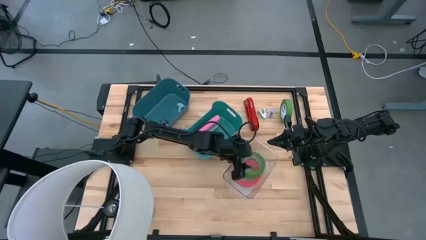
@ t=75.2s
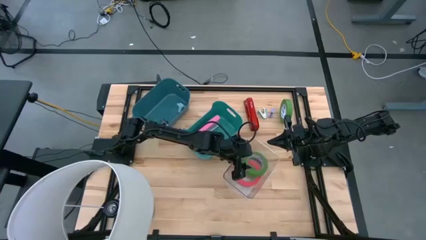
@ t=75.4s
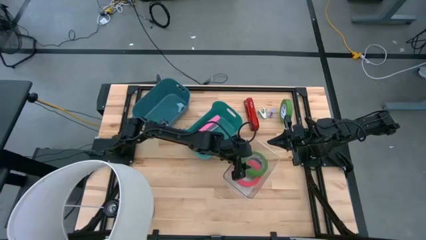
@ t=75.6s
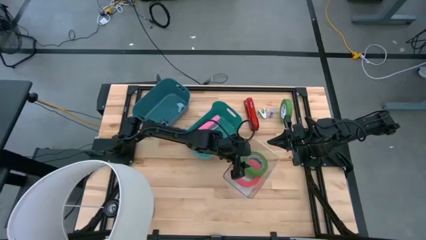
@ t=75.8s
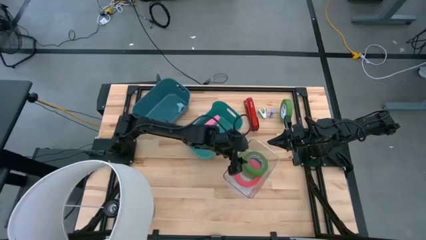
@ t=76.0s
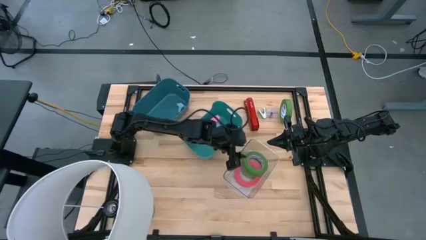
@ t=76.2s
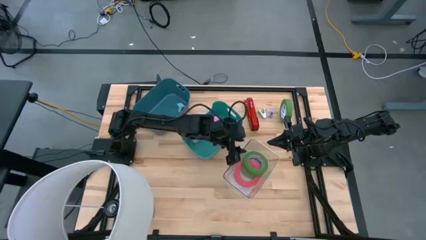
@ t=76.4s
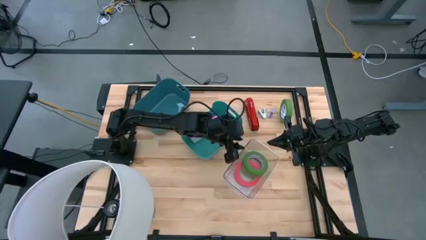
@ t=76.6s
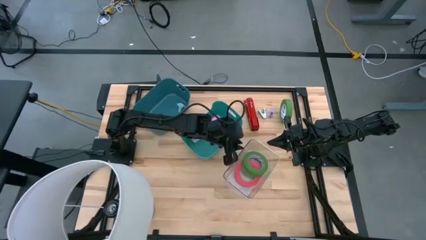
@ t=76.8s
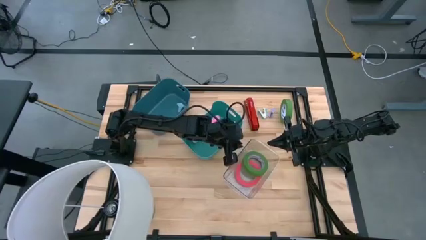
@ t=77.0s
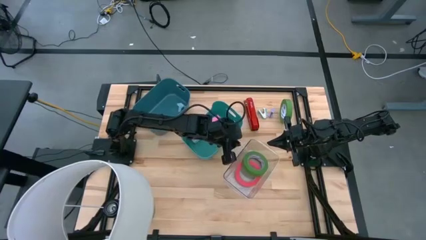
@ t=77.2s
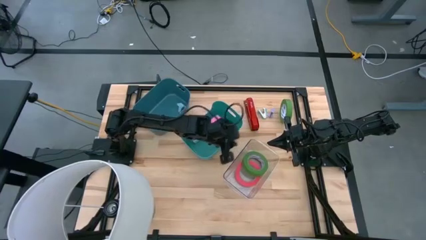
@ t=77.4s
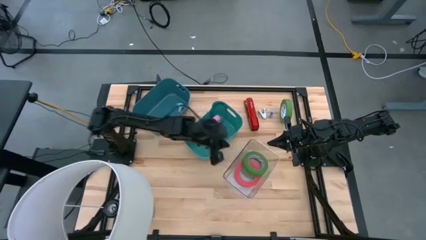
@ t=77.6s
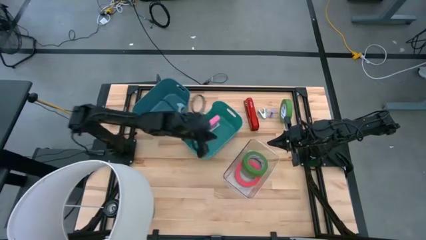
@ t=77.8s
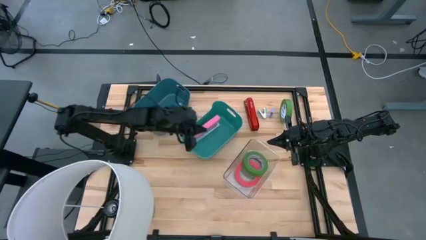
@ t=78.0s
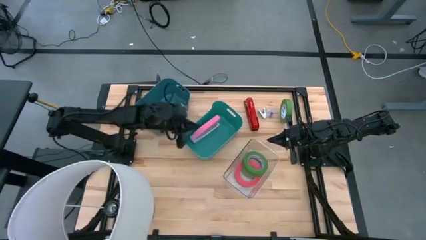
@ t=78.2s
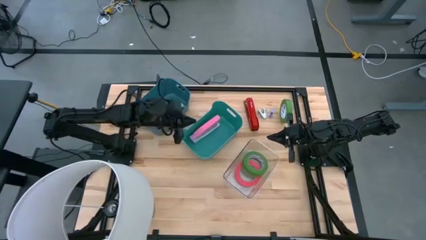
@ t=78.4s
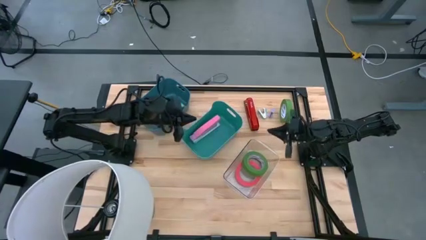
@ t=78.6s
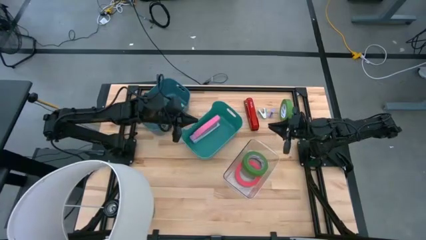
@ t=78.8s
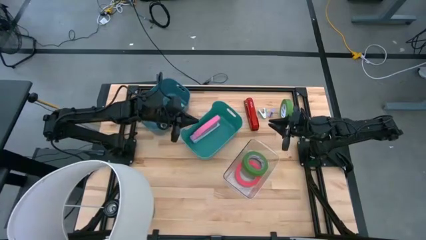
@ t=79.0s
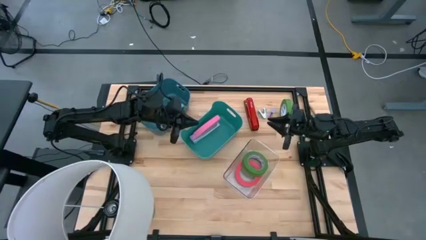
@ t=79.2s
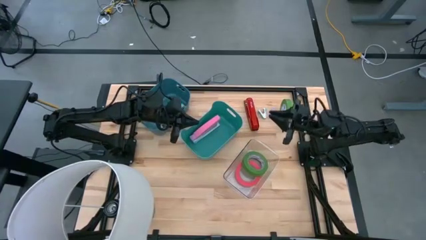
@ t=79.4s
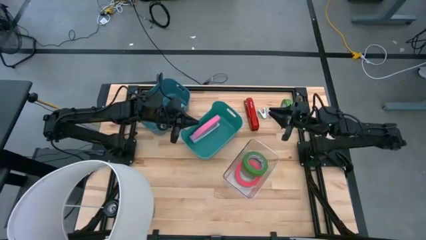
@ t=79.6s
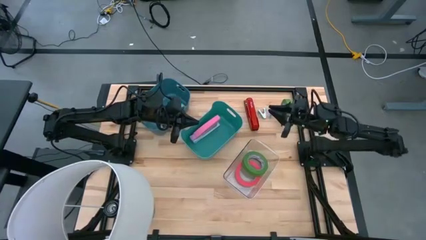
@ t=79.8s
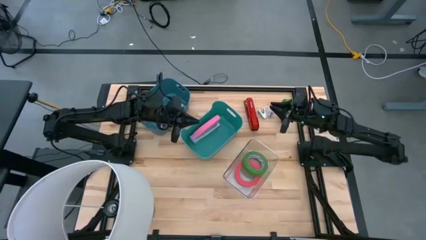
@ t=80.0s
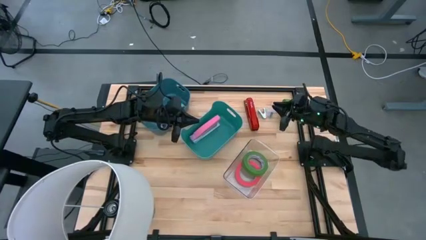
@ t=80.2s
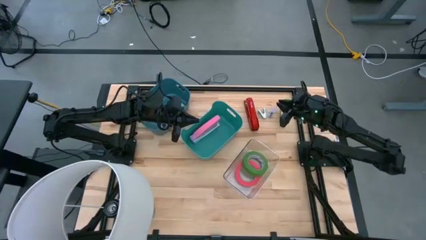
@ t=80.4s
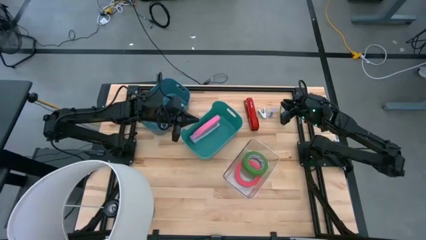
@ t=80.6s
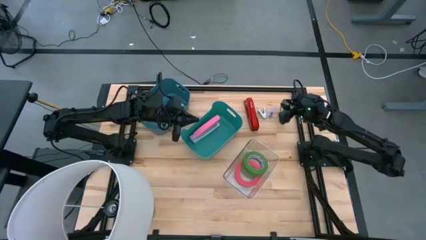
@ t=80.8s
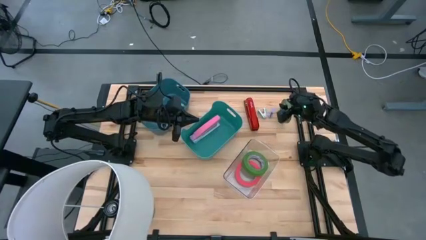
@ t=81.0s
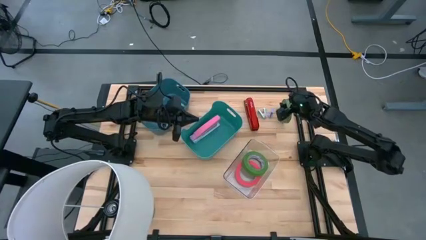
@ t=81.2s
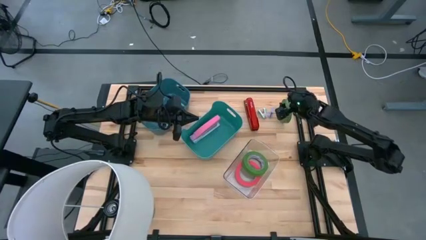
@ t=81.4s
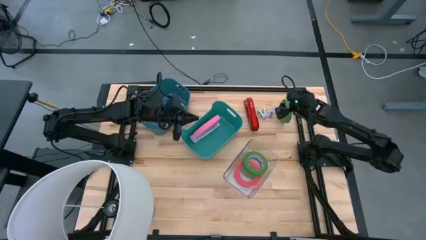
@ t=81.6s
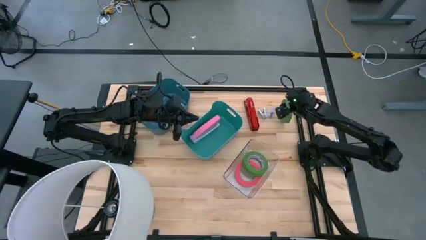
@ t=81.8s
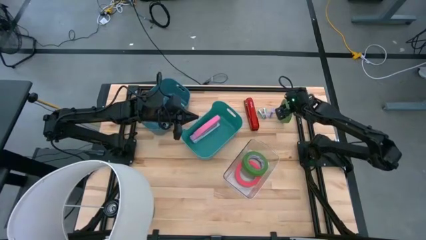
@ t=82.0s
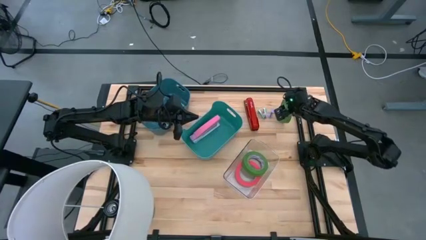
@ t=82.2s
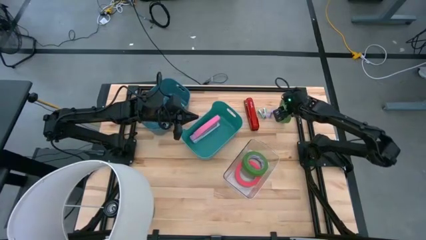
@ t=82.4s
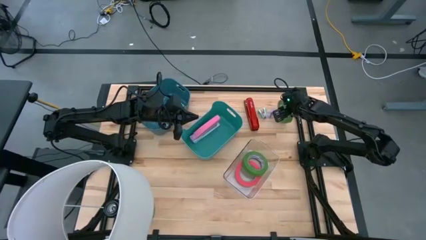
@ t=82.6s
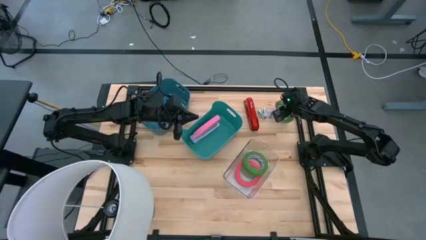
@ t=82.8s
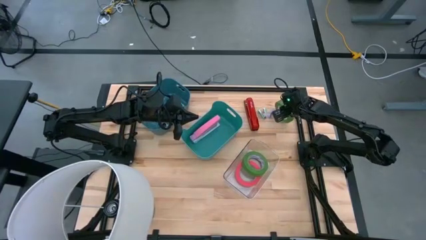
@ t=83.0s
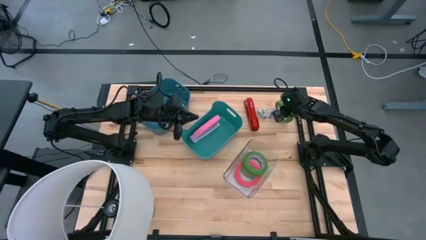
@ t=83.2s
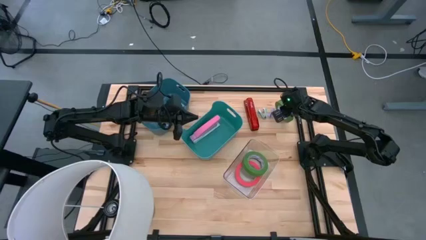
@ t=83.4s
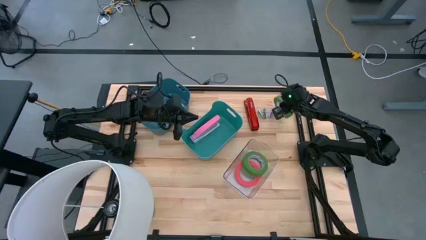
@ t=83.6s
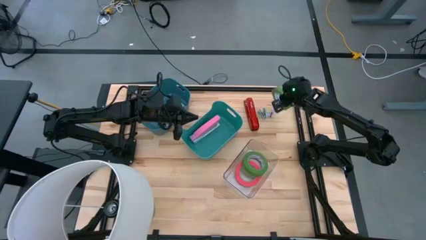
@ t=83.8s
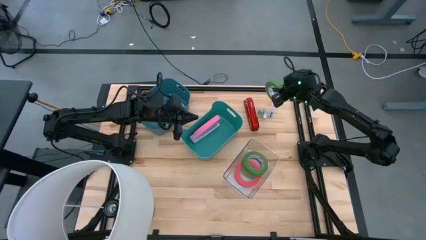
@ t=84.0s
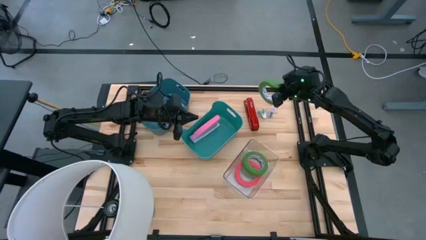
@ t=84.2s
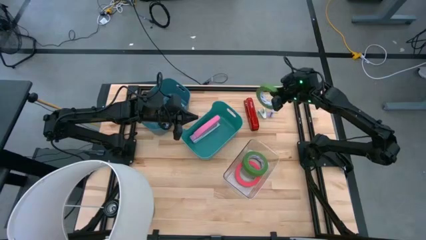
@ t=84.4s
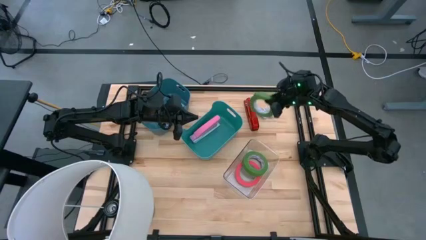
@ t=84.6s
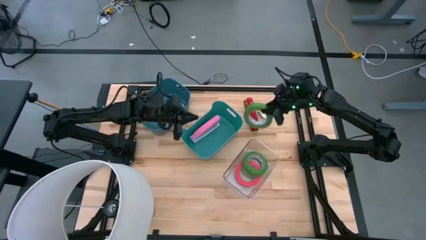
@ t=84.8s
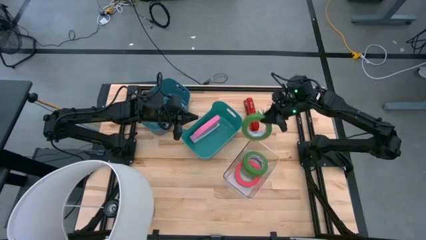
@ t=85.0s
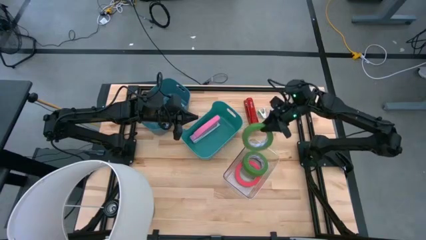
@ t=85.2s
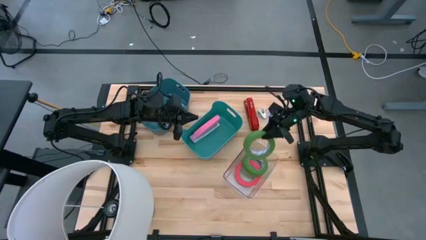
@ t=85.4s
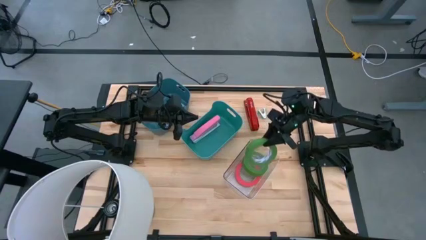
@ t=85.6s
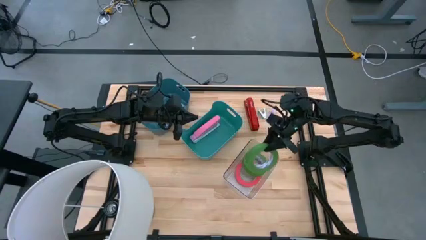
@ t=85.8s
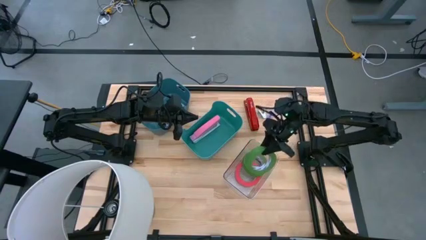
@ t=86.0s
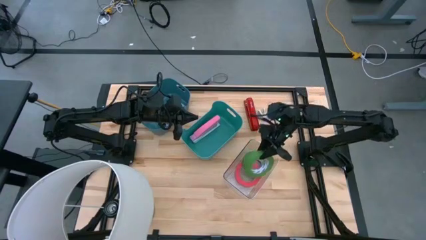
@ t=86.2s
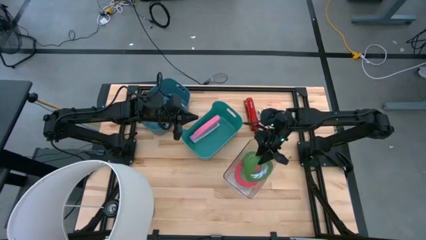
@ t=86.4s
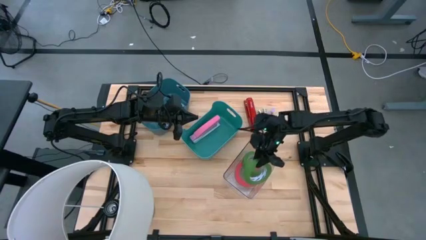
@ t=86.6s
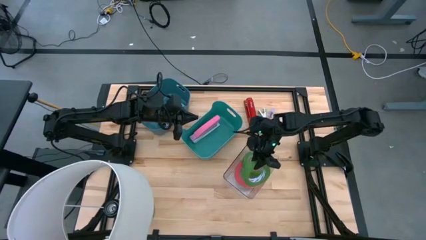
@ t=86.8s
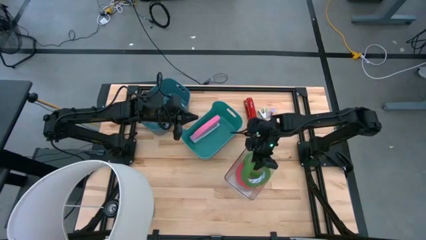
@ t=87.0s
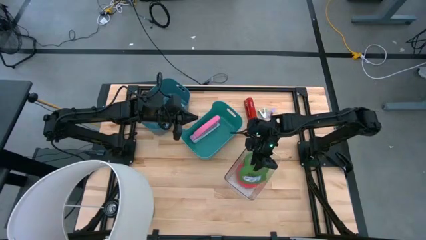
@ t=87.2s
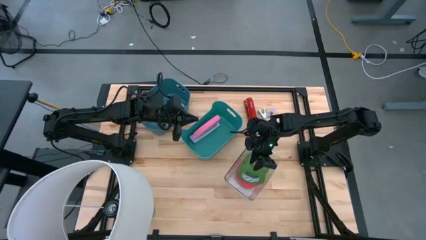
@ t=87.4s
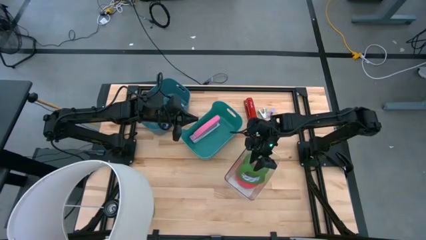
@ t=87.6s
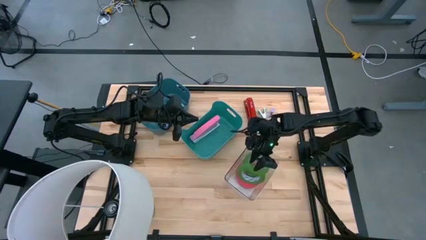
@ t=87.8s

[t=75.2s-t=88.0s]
Task: Pick and place Stapler, Stapler remover, tape
Put the green tape into the transparent bin

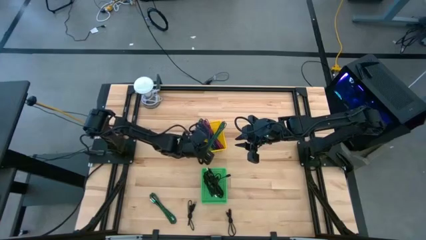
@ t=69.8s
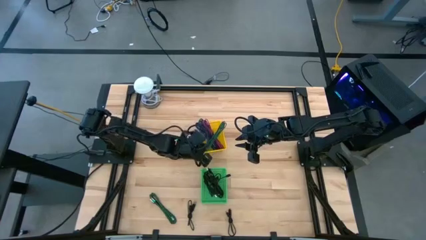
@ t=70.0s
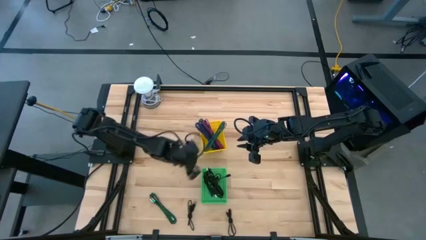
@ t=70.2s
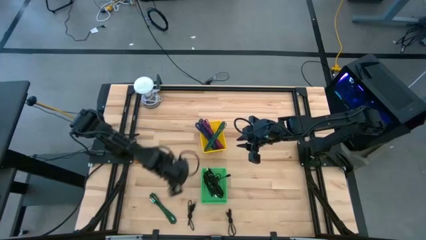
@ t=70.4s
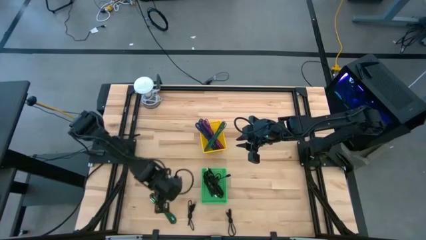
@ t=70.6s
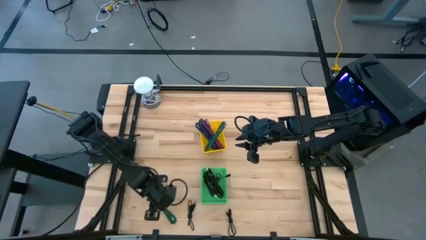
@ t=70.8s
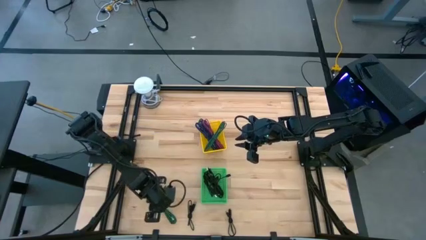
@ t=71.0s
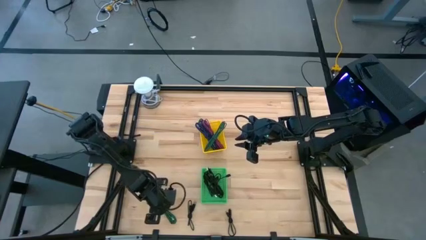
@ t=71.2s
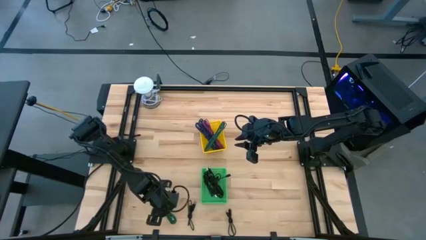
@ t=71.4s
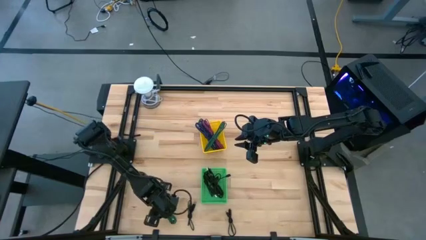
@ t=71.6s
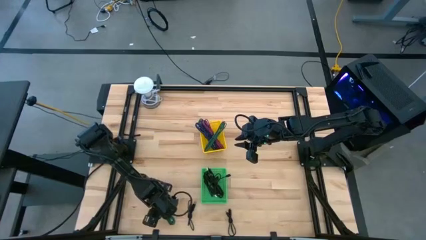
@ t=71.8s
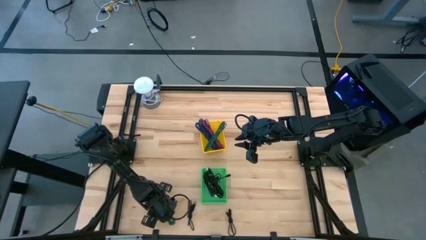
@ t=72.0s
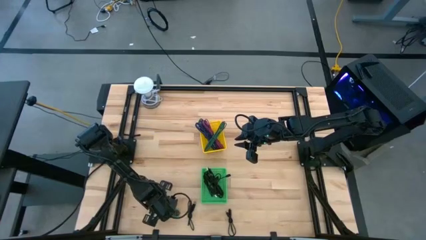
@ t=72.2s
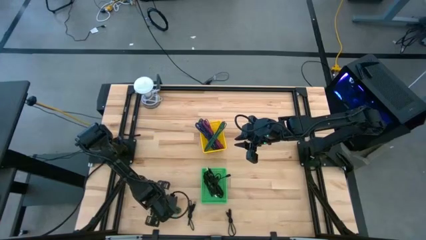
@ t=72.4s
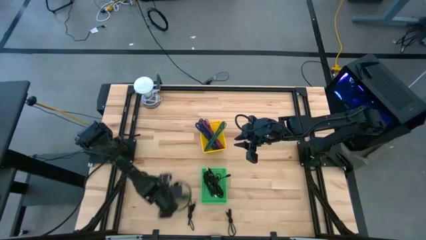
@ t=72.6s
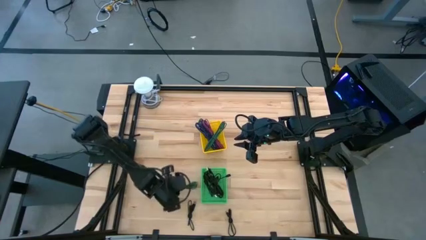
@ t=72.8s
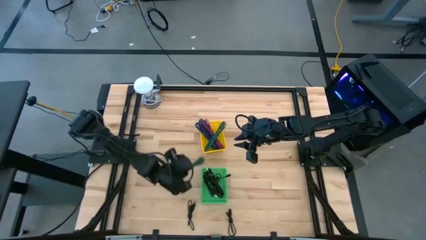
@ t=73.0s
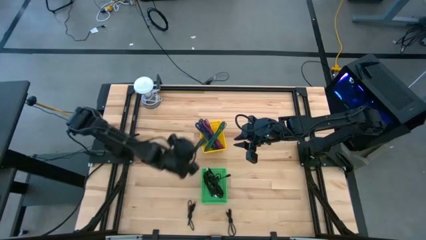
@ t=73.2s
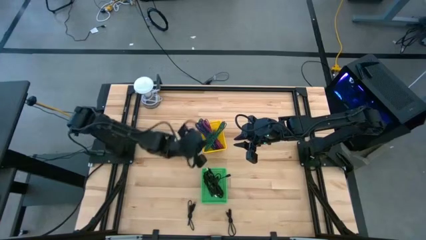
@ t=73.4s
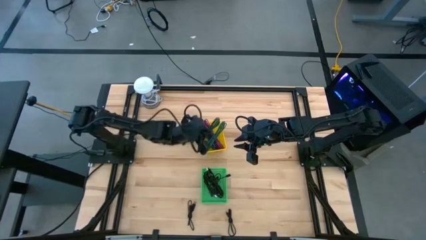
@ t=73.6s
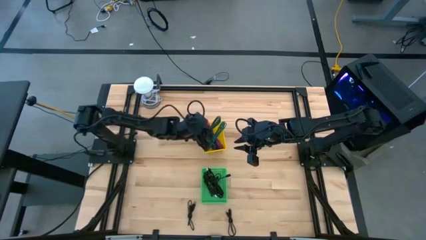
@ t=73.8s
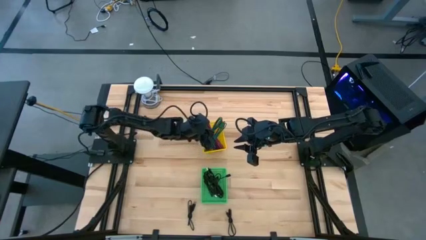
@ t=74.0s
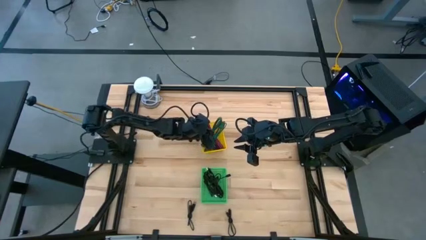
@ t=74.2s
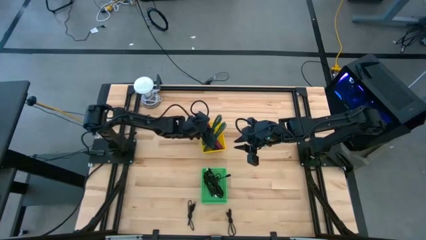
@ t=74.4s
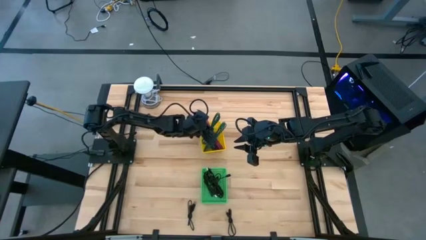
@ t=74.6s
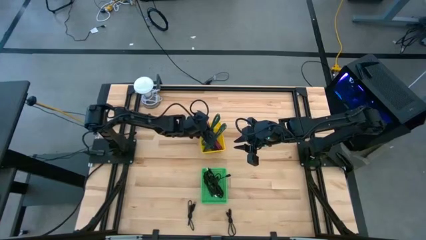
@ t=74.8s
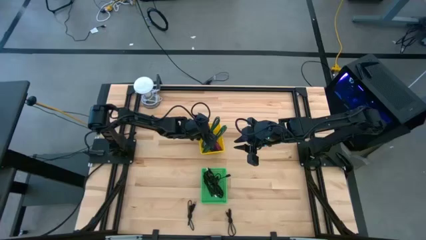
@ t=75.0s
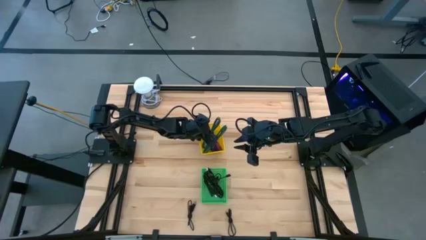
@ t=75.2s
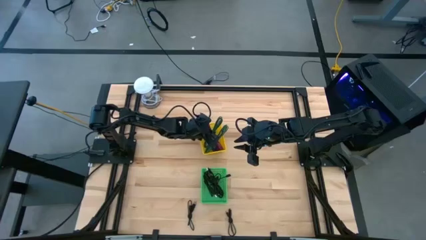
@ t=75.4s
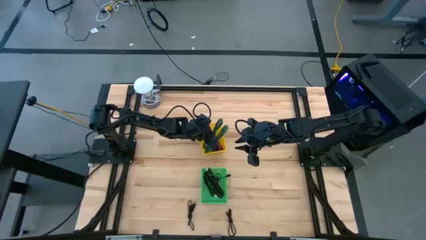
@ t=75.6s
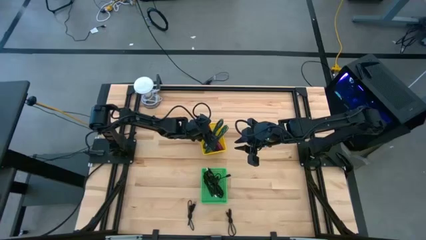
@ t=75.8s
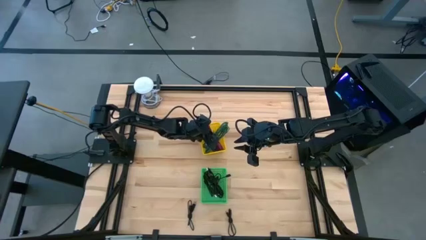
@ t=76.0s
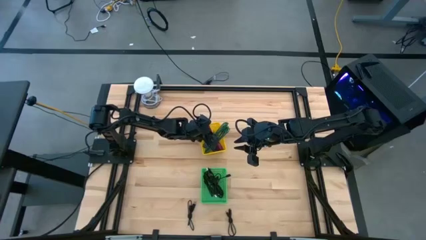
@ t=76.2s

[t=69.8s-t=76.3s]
Task: Pick & Place USB Port
Put the black and green charger cable into the yellow bin
